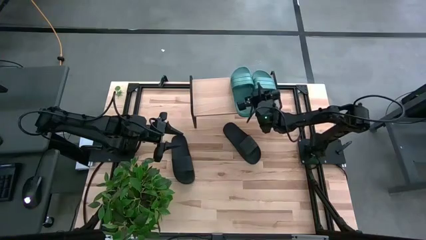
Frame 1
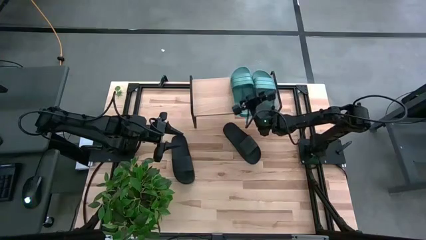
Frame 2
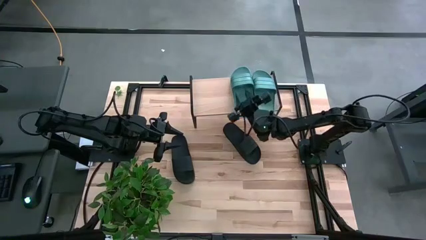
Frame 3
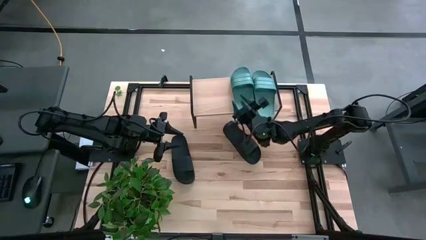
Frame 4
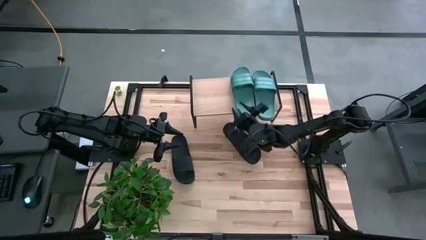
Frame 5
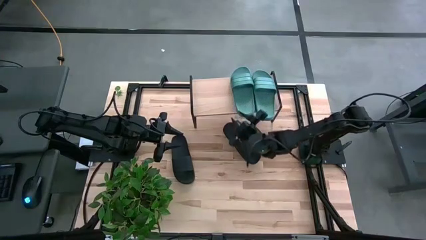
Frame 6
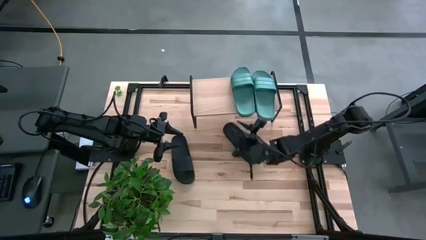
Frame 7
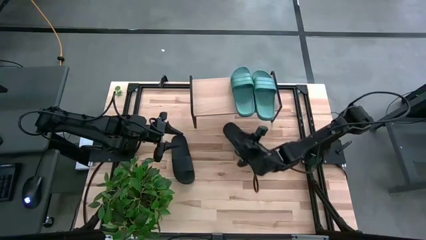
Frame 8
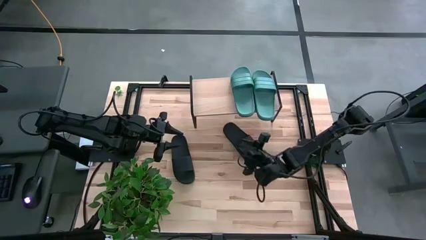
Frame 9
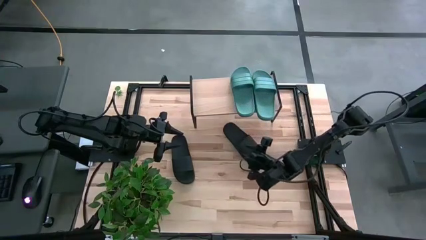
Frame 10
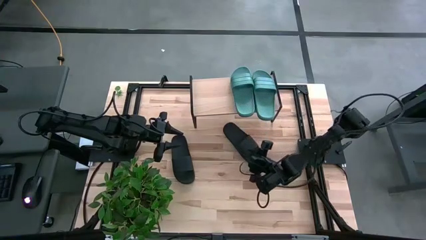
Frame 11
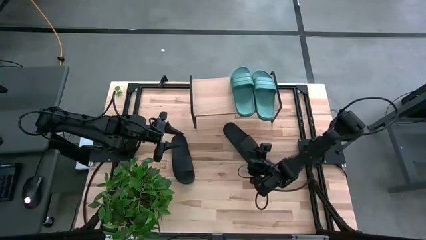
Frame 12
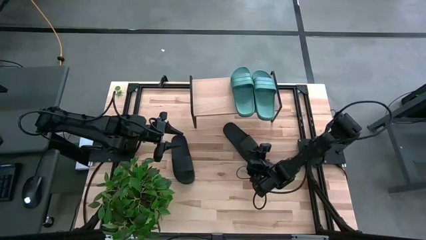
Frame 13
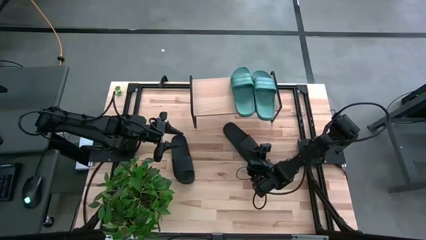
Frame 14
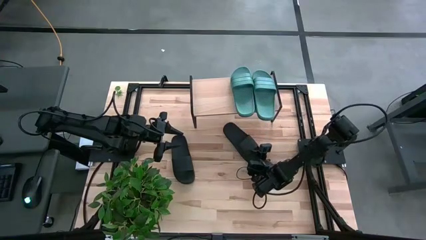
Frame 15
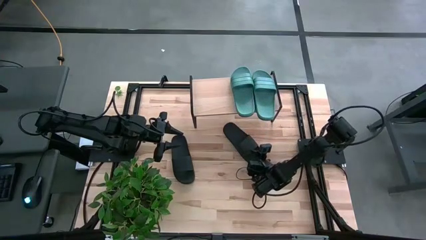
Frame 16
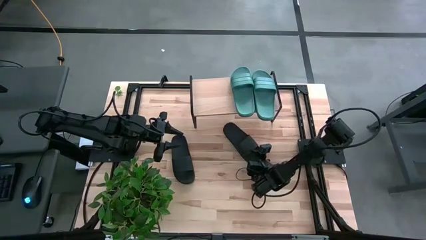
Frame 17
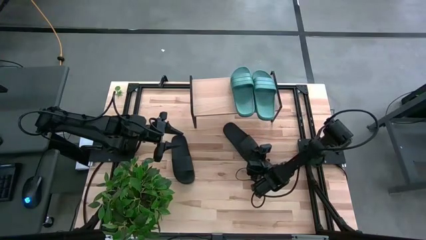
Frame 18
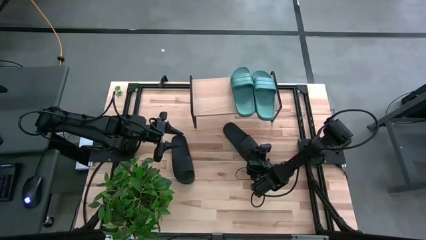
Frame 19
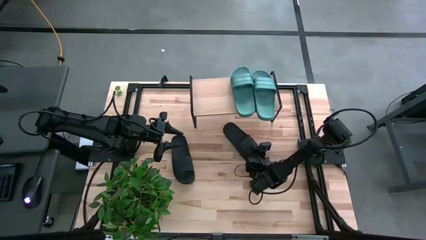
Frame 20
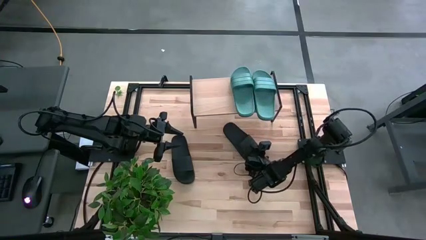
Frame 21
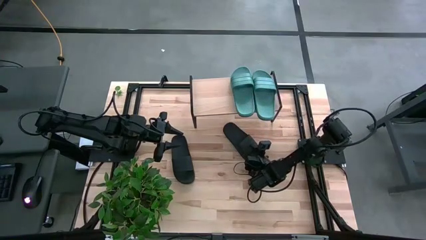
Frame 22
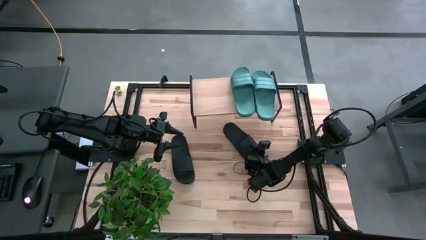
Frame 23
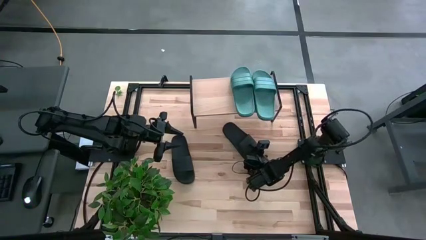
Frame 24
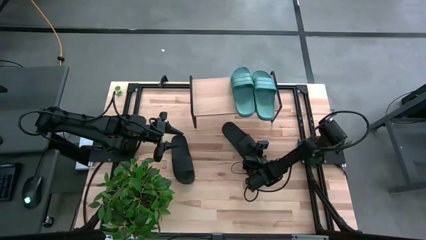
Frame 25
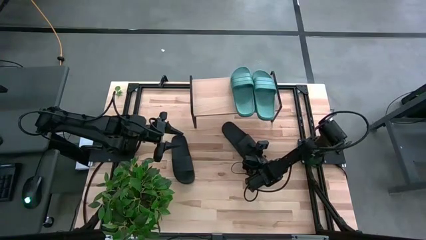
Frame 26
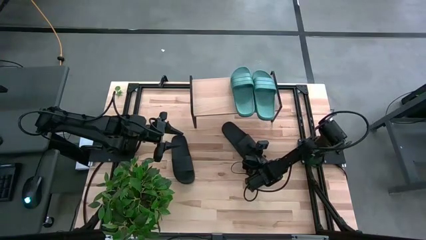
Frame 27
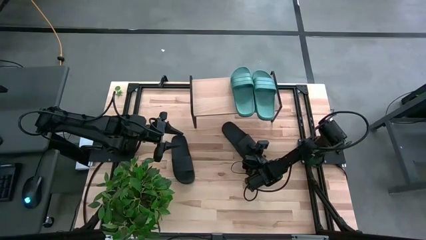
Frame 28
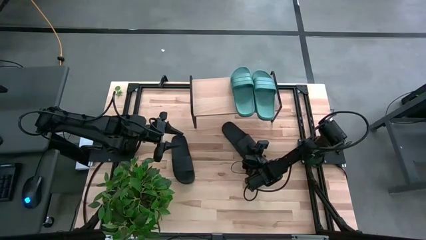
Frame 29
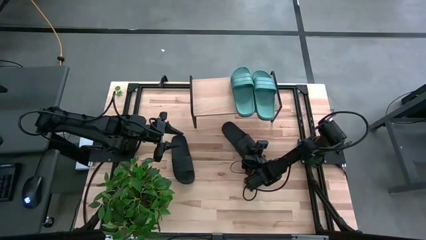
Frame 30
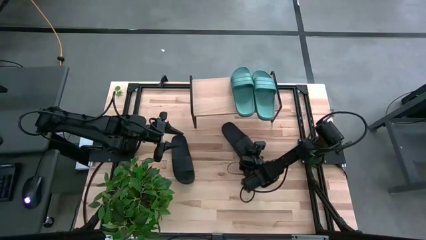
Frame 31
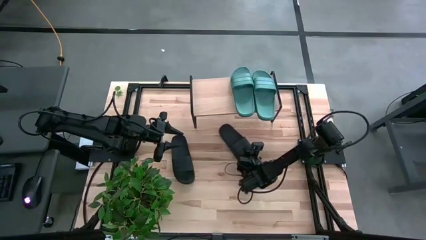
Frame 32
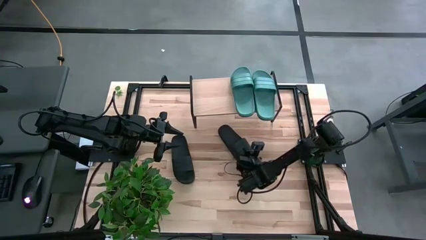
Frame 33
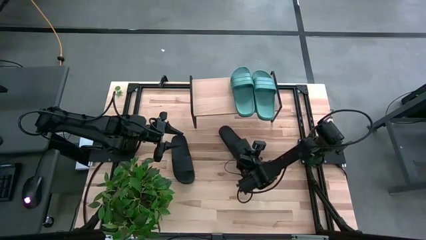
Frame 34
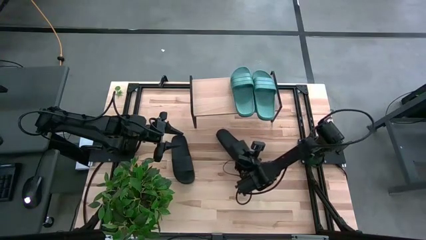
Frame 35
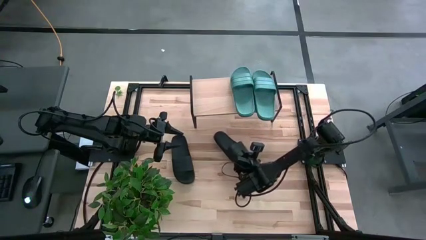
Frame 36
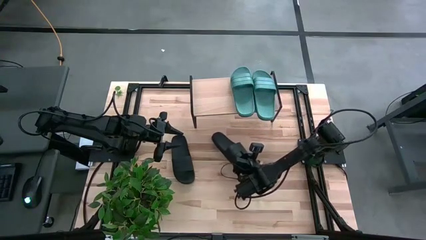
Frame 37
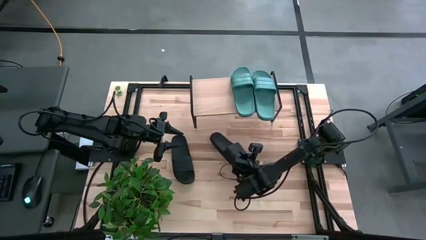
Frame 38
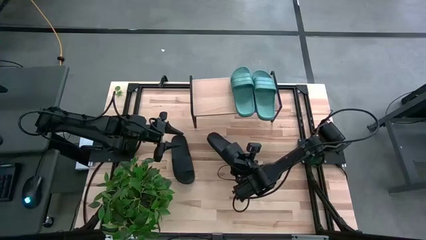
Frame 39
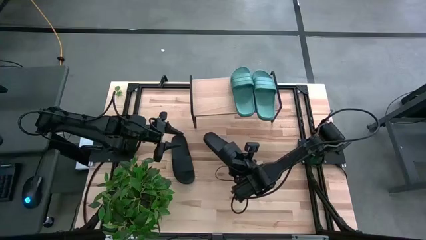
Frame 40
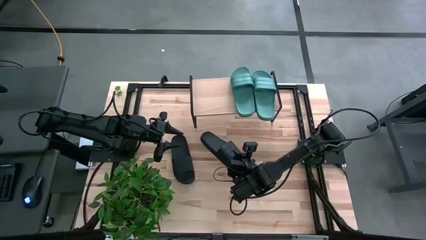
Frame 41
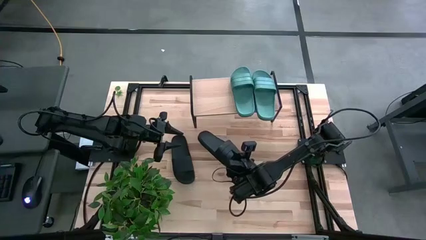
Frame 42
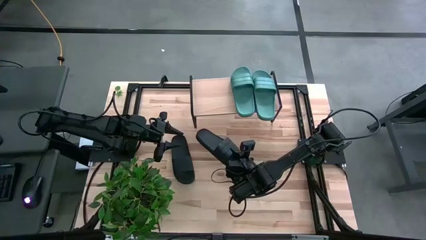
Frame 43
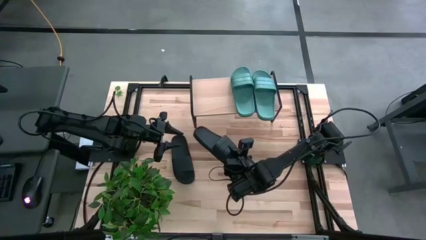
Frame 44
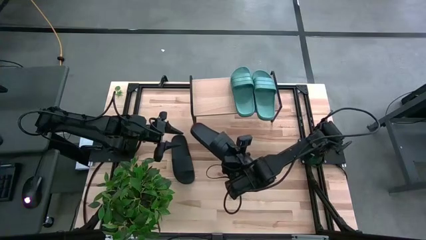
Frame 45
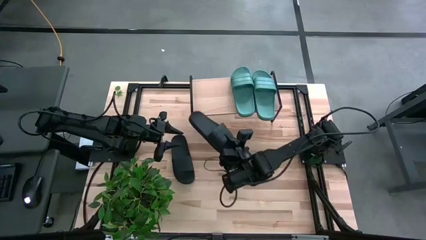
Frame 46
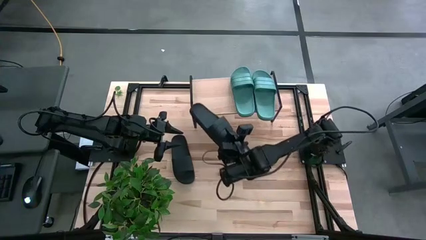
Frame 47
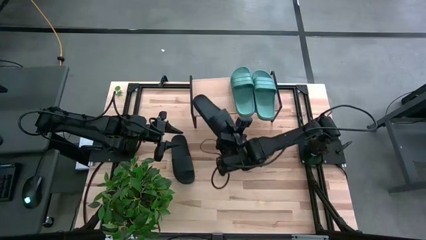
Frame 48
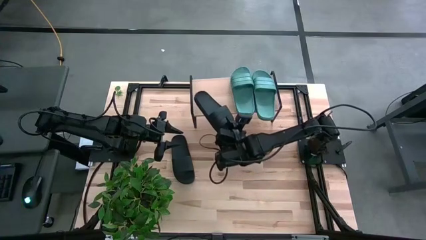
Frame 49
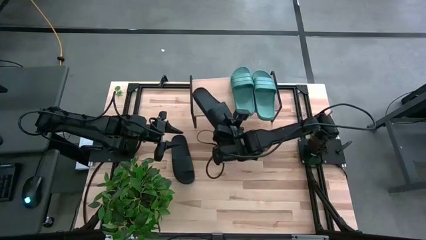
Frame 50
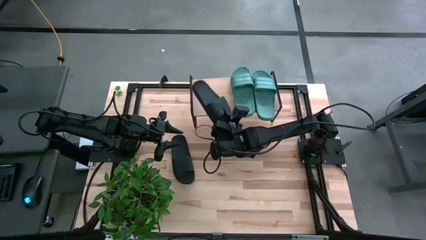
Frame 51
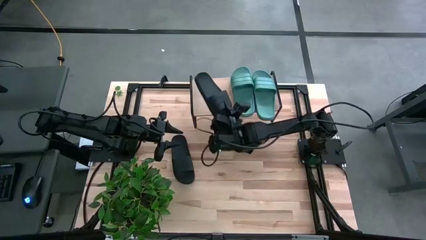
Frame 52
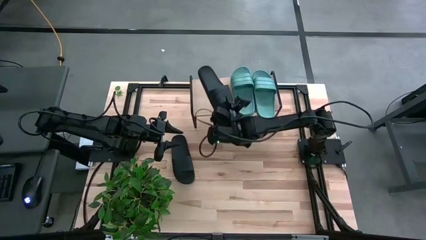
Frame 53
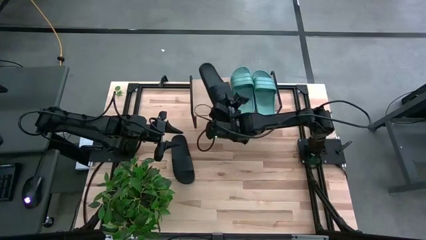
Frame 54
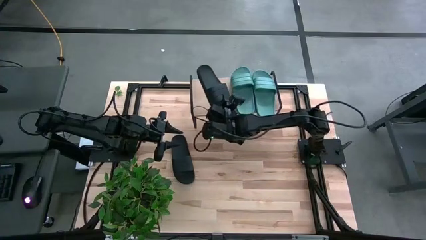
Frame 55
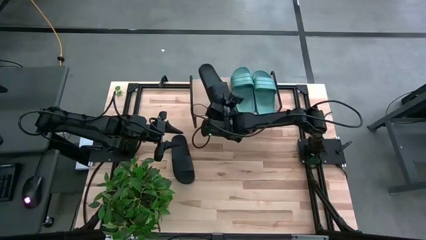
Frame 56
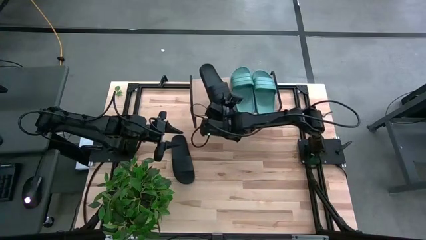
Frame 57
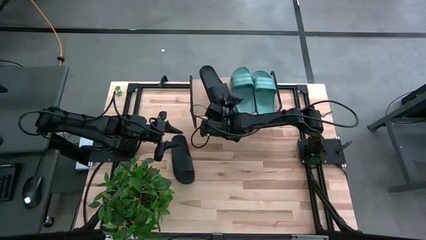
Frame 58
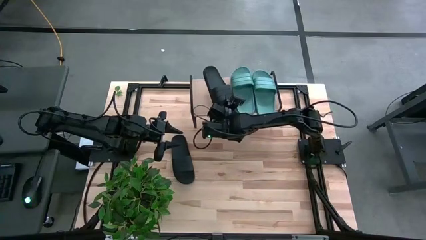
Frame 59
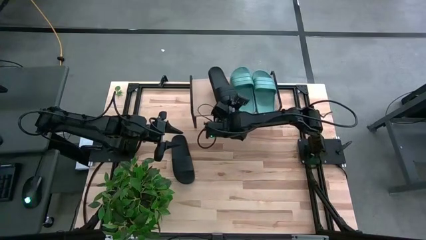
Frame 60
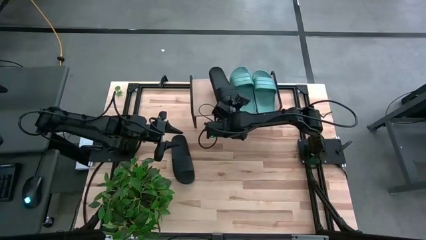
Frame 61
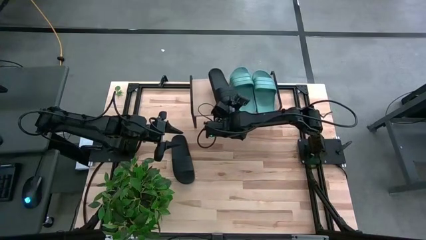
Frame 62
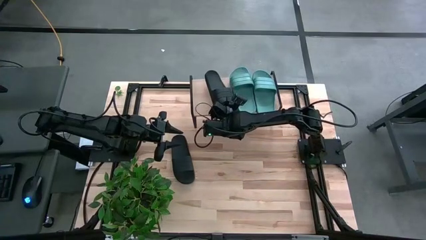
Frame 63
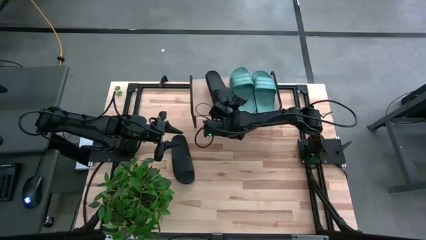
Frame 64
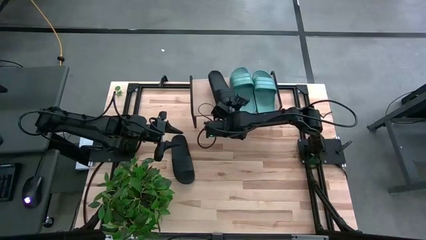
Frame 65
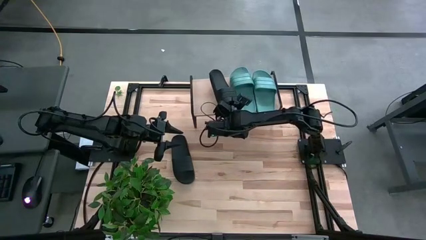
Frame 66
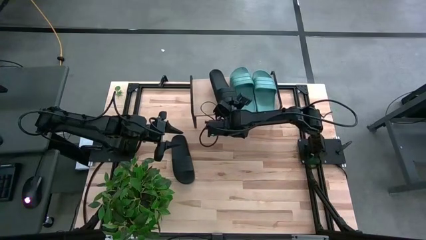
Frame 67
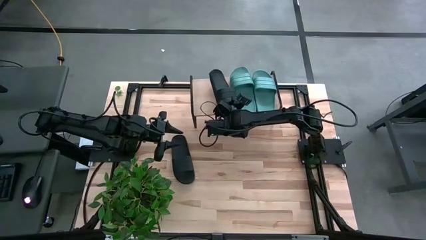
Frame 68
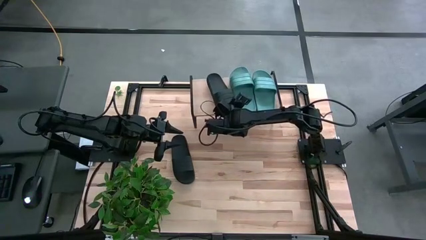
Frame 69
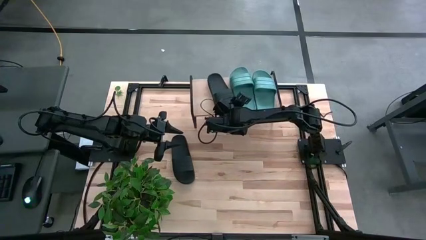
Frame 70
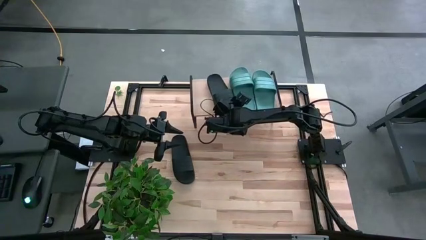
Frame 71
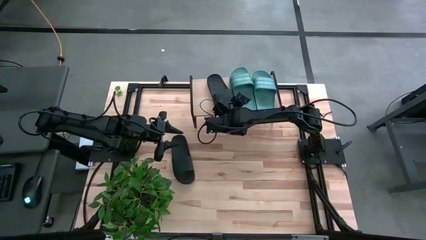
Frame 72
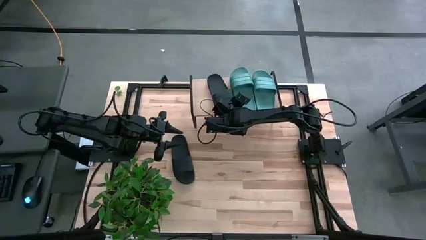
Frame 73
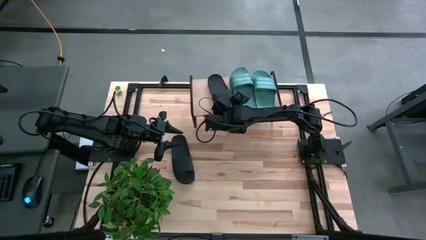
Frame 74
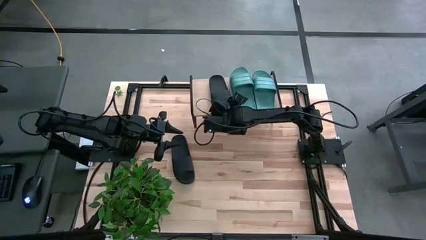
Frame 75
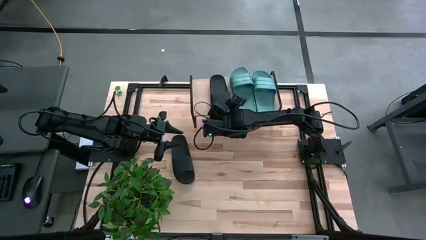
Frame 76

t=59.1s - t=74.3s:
Task: Pick and place slides into the shelf
Put the right dark green slipper on the shelf
